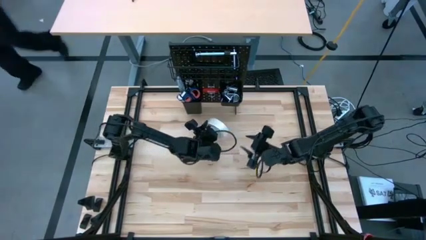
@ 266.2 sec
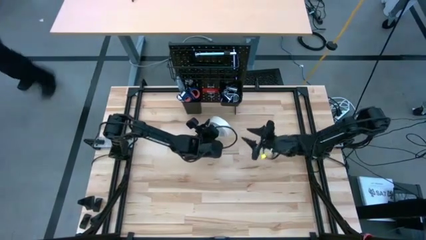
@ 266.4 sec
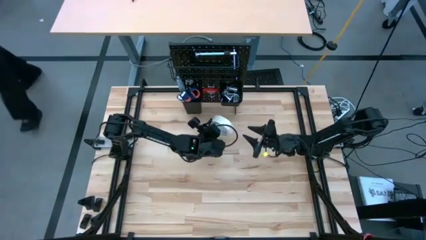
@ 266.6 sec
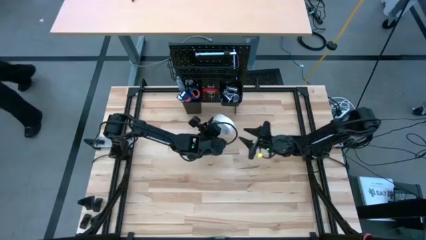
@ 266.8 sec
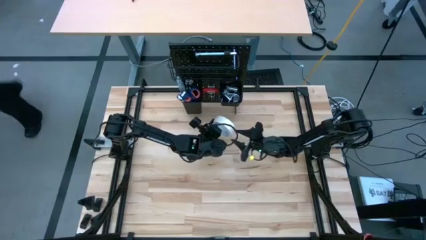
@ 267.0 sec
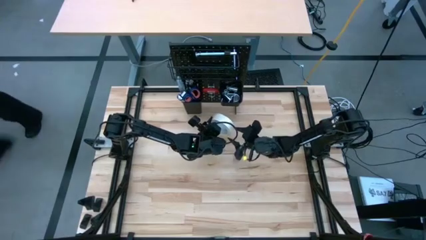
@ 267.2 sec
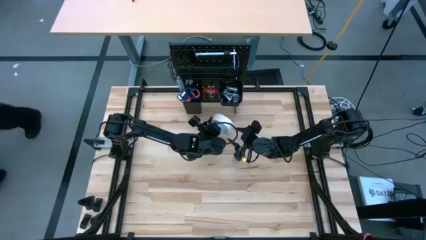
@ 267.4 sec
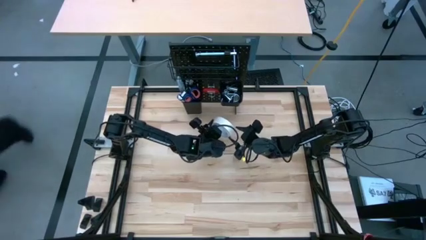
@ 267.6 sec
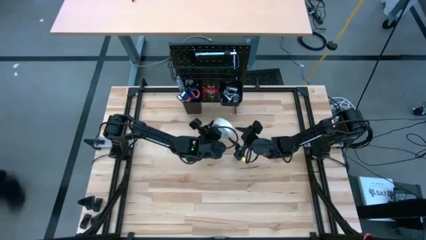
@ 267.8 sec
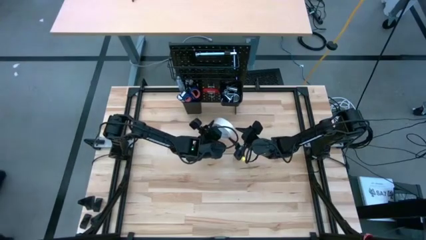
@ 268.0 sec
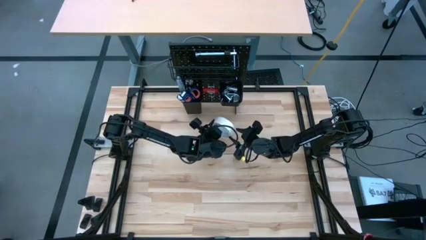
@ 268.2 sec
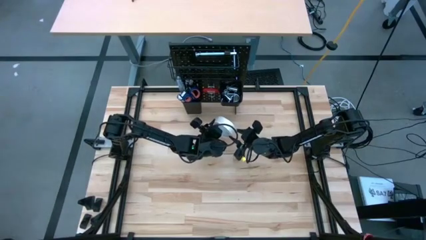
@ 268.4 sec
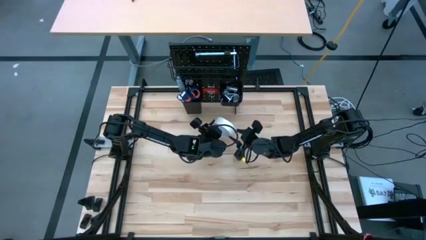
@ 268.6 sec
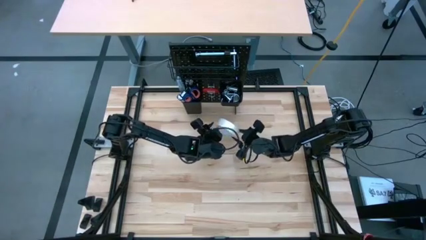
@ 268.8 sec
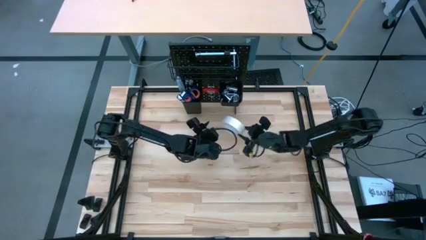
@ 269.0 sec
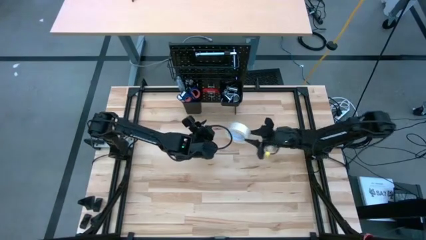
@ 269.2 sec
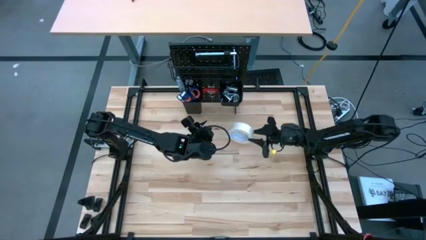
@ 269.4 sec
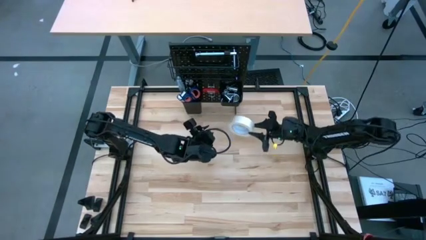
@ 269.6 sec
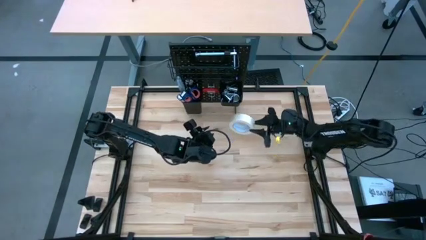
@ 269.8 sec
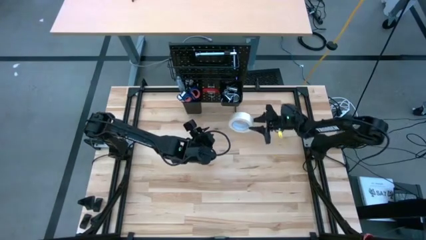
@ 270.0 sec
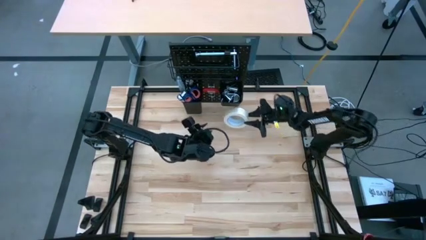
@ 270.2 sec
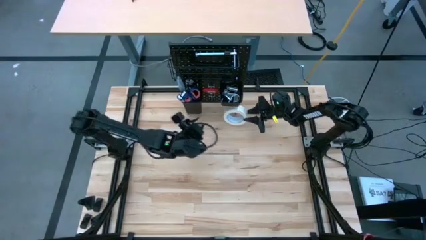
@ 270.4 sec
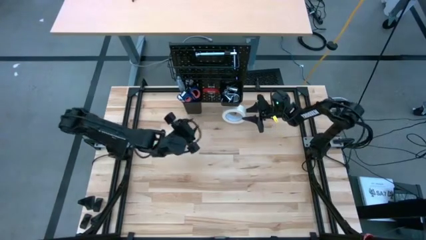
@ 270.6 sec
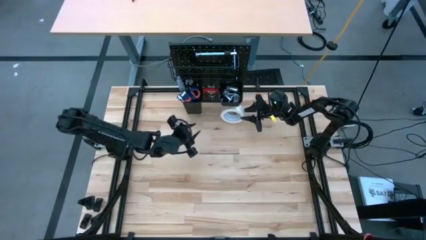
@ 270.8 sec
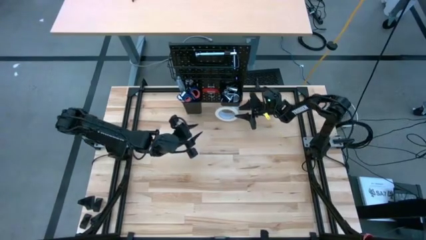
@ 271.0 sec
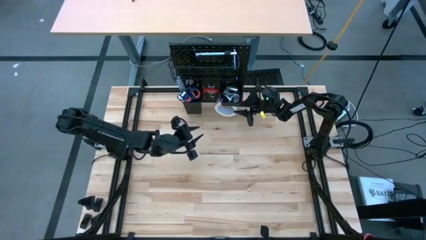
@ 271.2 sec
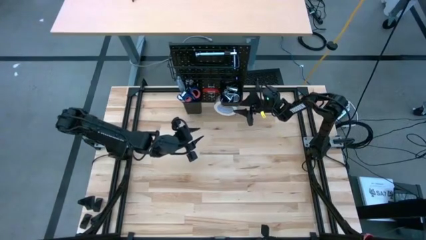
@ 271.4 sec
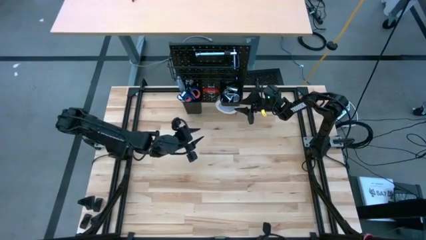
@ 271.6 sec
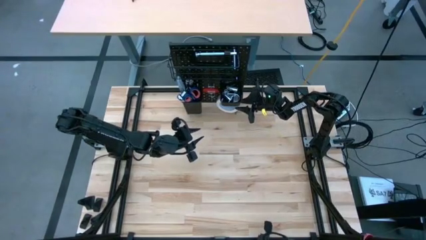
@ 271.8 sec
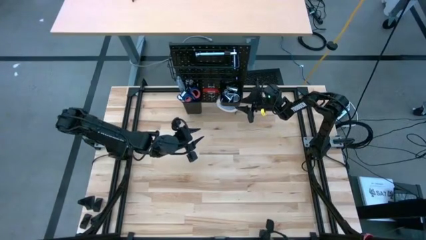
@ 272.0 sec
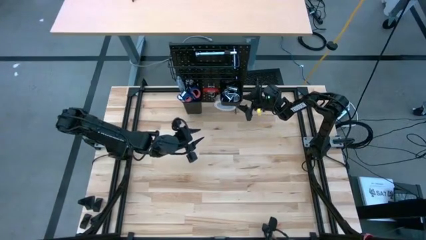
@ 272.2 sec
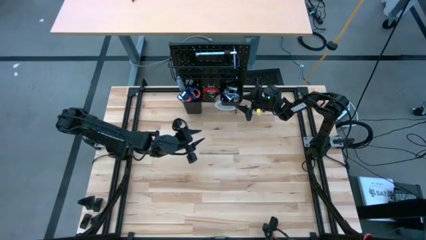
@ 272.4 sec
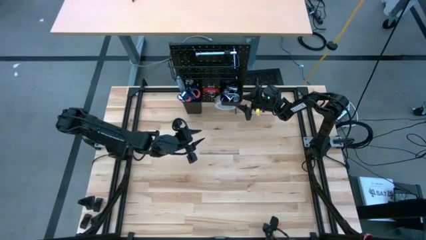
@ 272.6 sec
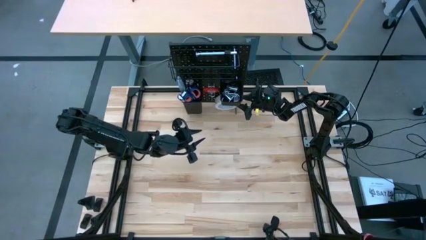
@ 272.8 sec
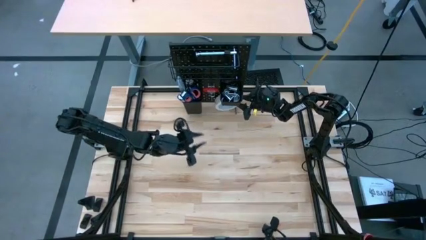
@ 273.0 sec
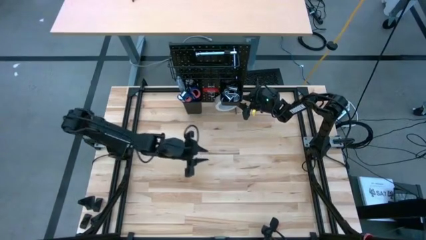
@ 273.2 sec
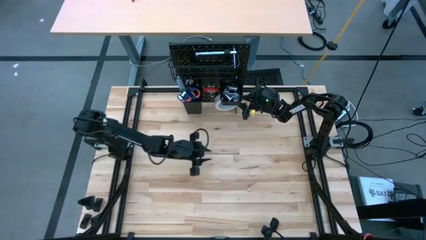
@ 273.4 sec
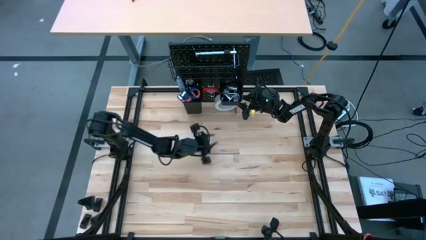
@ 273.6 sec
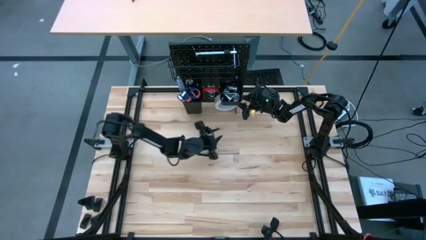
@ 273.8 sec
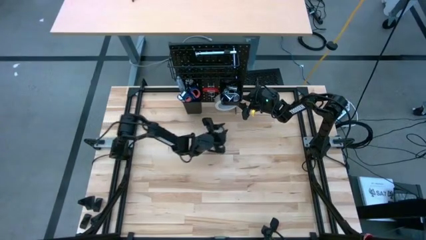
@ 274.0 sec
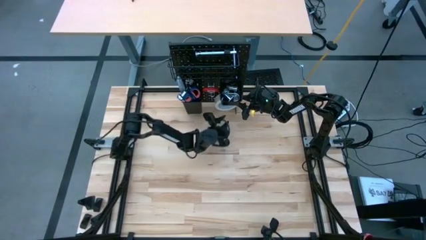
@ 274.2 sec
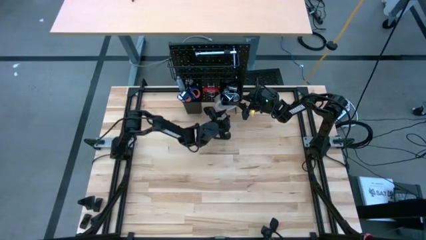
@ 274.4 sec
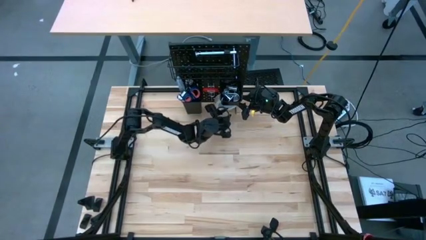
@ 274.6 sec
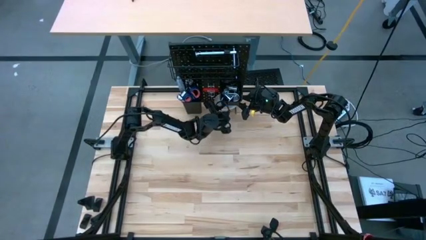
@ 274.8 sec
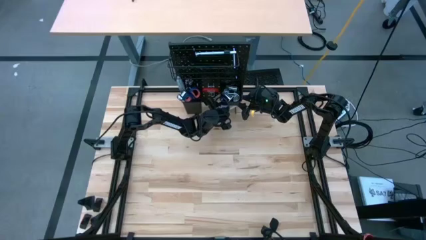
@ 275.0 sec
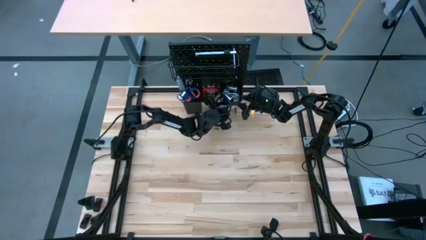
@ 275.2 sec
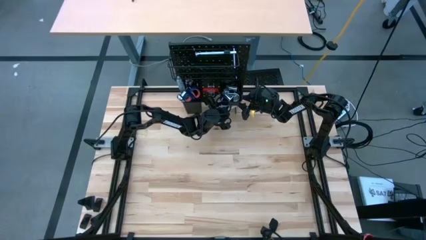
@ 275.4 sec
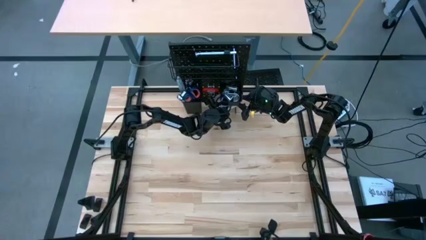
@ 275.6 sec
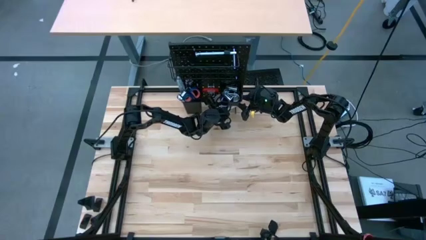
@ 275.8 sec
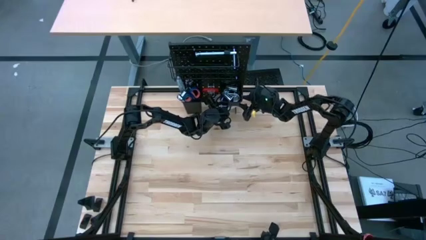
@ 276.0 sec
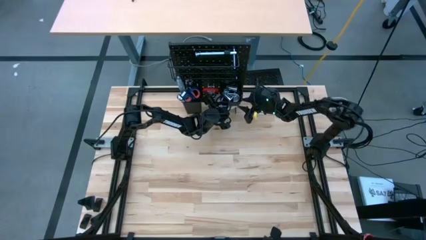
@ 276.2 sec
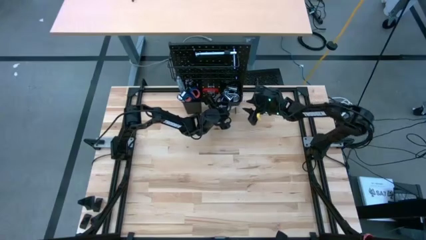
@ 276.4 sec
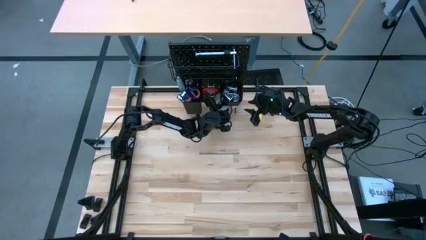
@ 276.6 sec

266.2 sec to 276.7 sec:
Task: Hang tools onto peg board
Hang the white masking tape on the peg board
